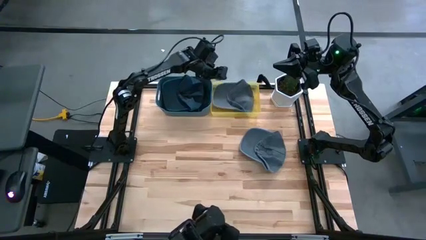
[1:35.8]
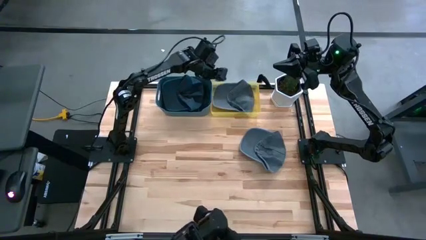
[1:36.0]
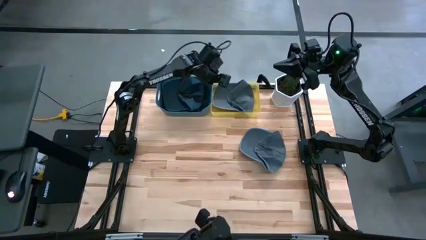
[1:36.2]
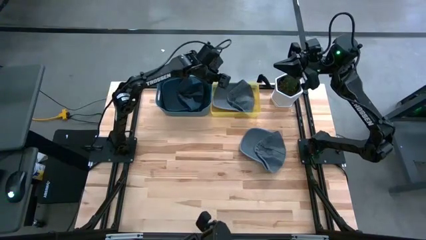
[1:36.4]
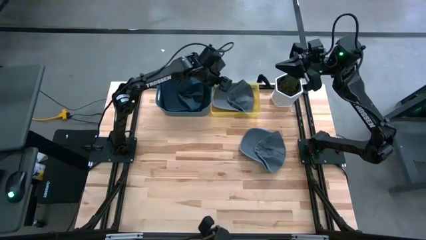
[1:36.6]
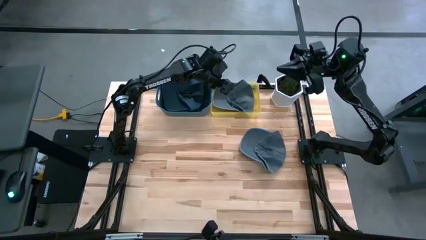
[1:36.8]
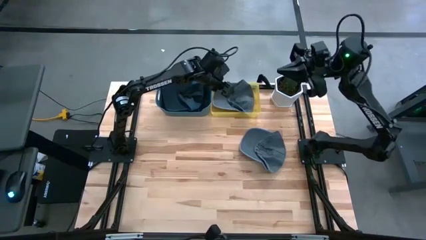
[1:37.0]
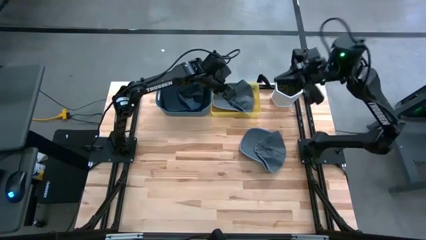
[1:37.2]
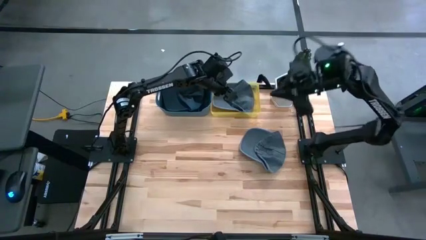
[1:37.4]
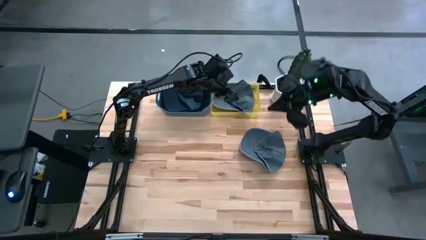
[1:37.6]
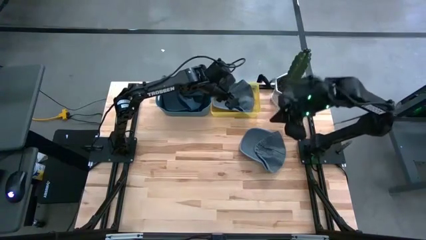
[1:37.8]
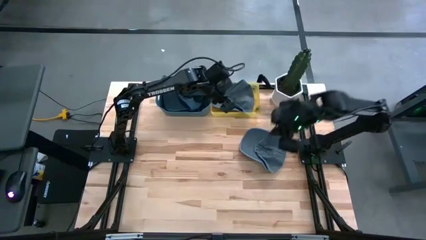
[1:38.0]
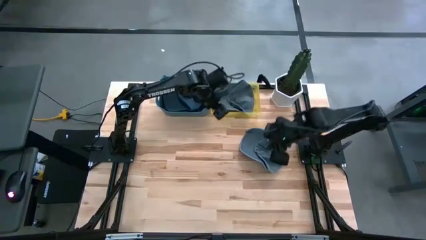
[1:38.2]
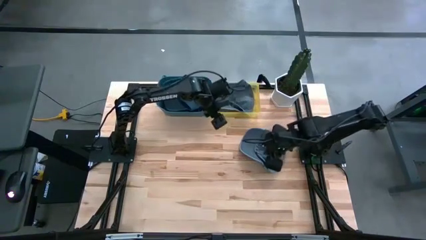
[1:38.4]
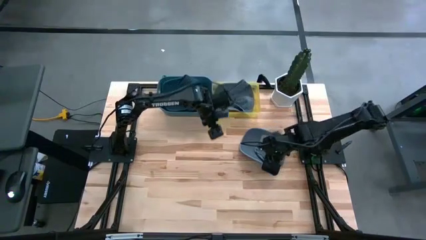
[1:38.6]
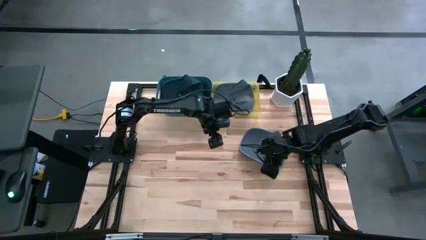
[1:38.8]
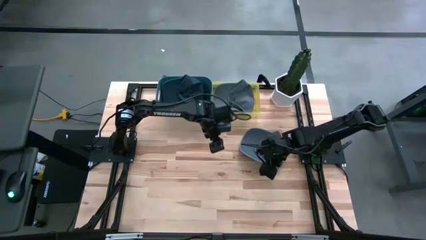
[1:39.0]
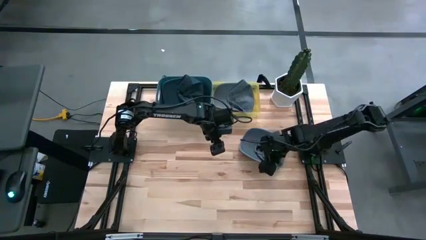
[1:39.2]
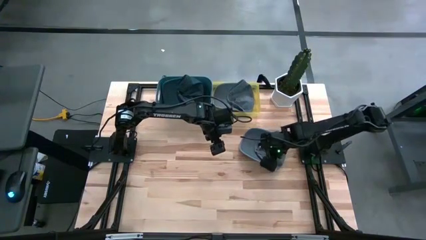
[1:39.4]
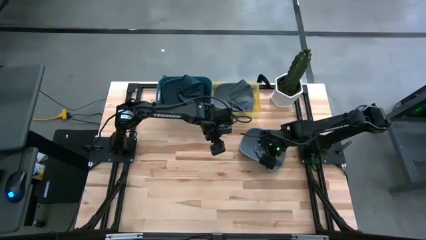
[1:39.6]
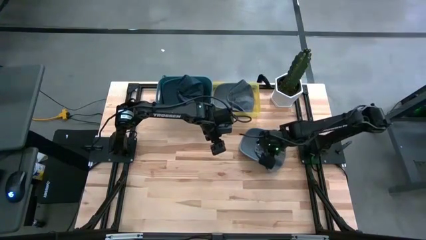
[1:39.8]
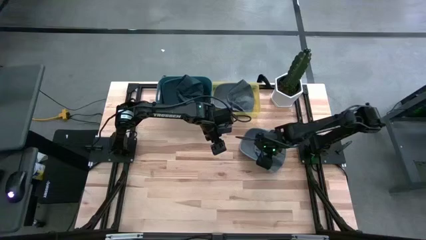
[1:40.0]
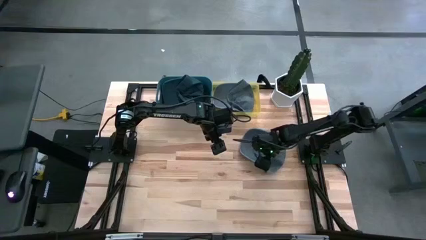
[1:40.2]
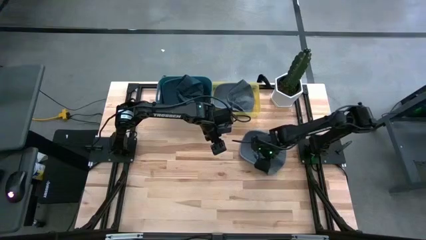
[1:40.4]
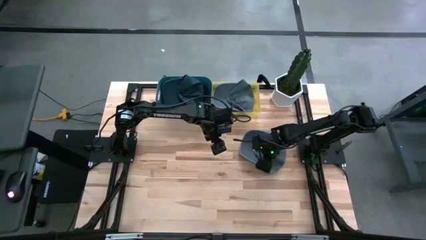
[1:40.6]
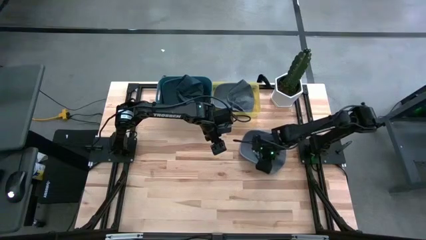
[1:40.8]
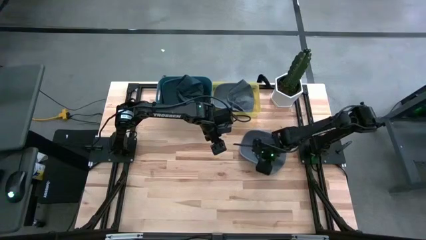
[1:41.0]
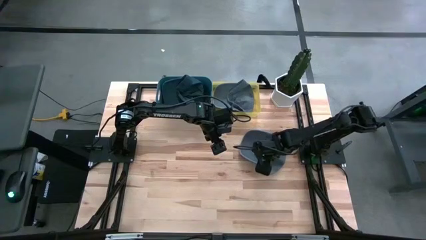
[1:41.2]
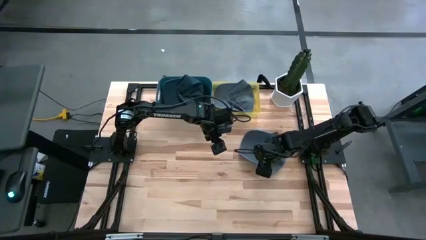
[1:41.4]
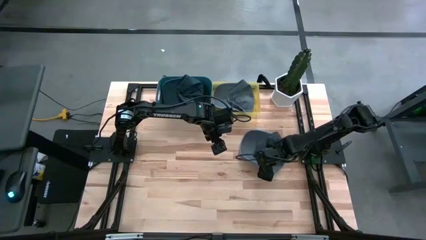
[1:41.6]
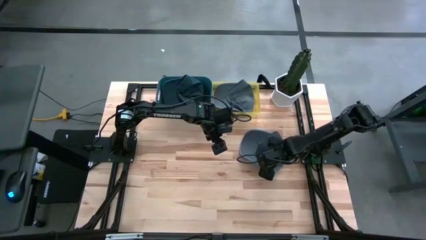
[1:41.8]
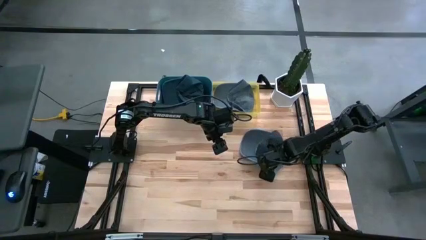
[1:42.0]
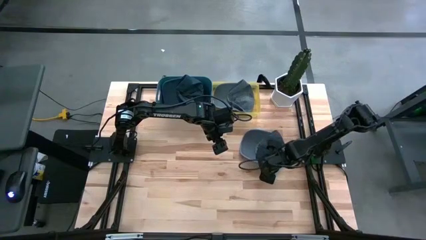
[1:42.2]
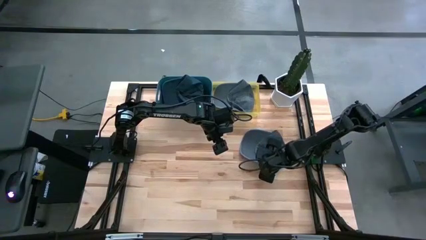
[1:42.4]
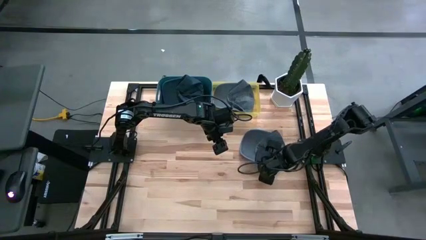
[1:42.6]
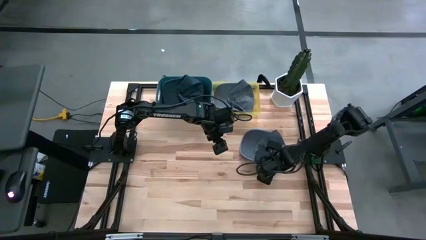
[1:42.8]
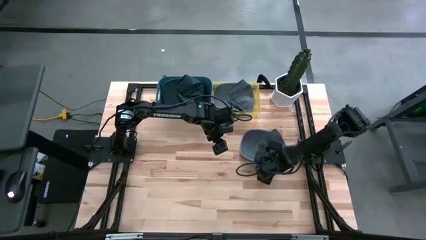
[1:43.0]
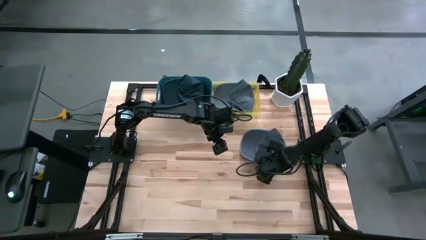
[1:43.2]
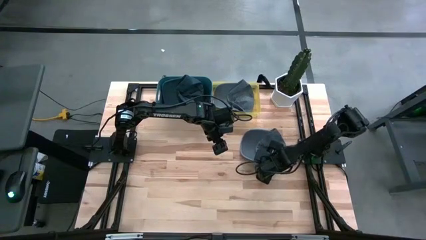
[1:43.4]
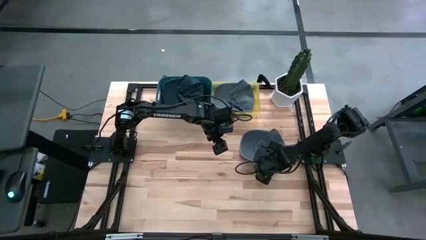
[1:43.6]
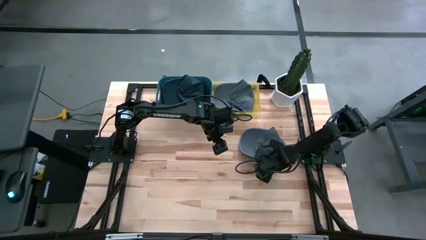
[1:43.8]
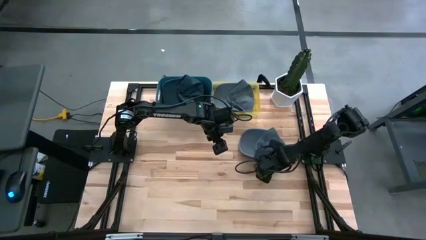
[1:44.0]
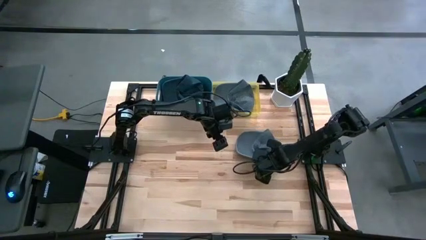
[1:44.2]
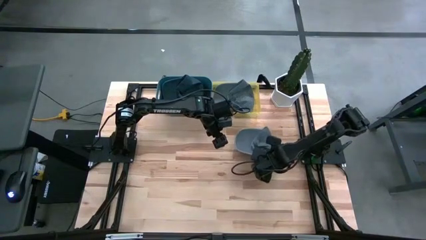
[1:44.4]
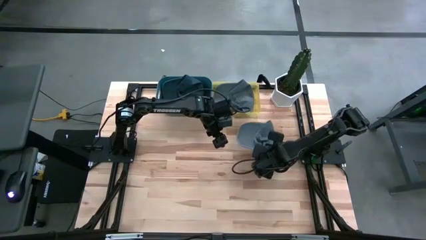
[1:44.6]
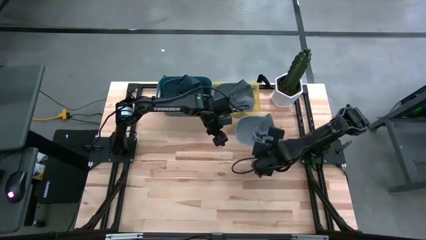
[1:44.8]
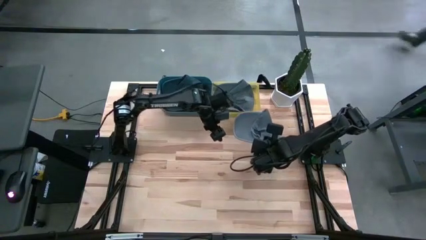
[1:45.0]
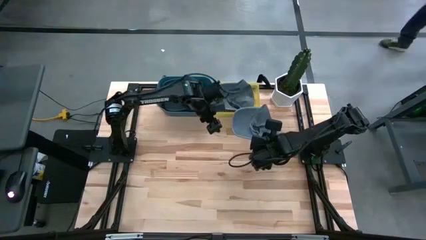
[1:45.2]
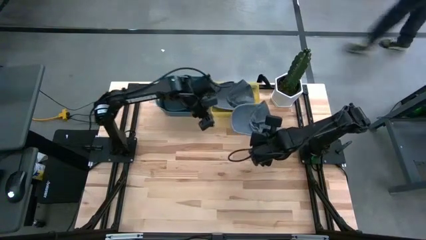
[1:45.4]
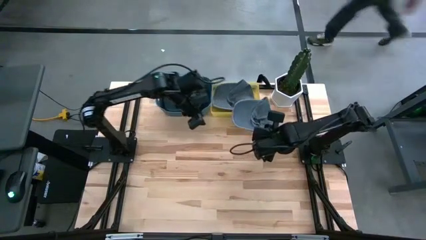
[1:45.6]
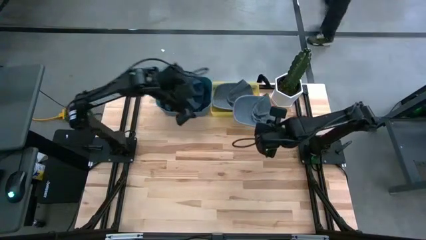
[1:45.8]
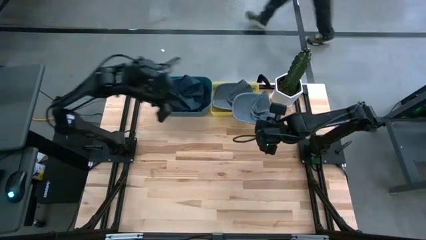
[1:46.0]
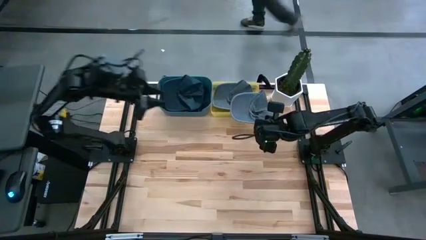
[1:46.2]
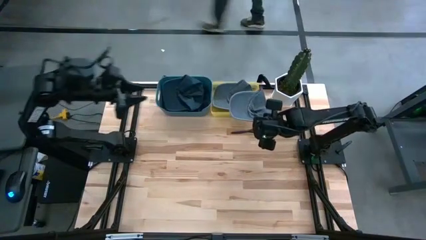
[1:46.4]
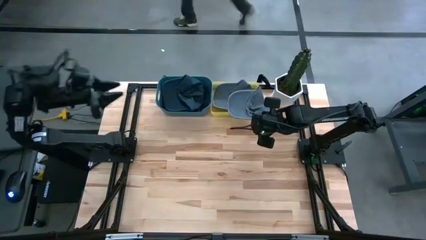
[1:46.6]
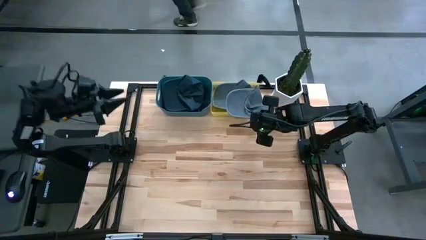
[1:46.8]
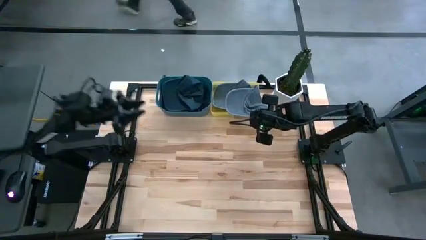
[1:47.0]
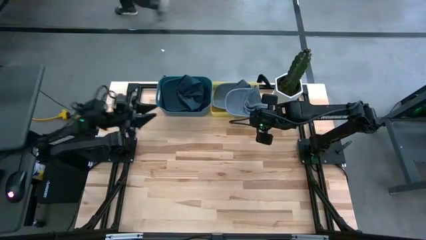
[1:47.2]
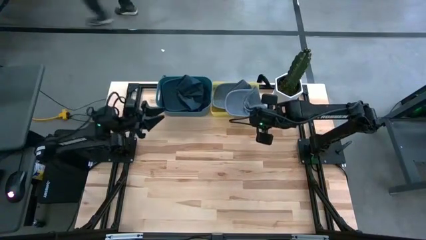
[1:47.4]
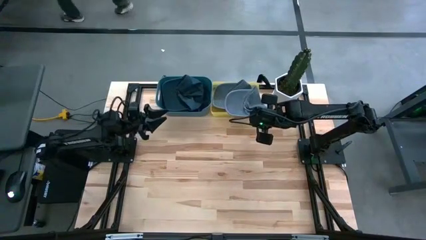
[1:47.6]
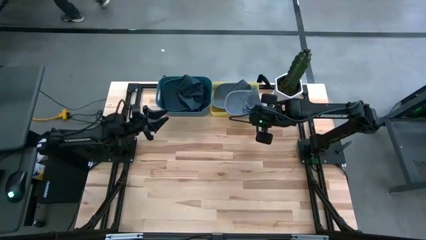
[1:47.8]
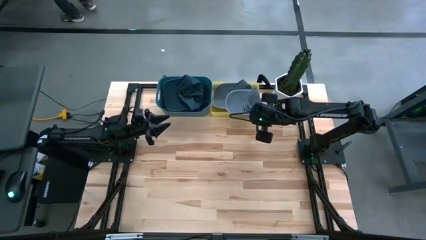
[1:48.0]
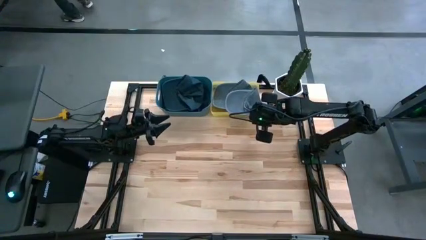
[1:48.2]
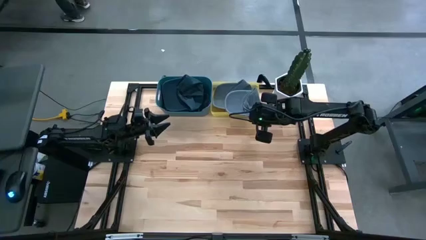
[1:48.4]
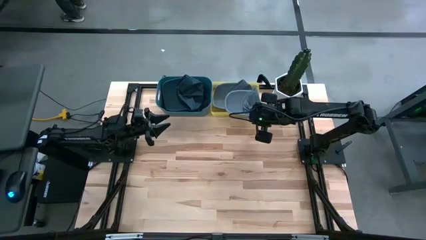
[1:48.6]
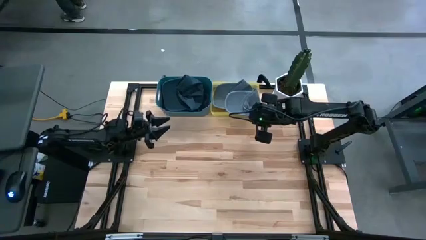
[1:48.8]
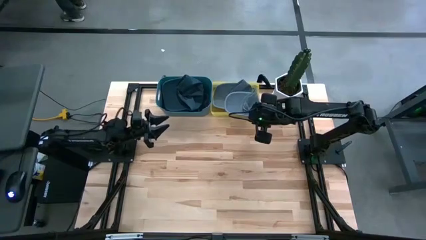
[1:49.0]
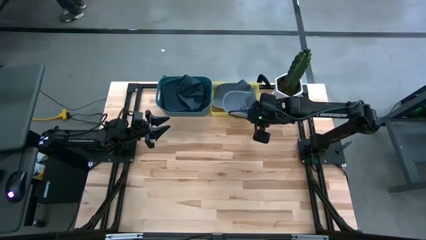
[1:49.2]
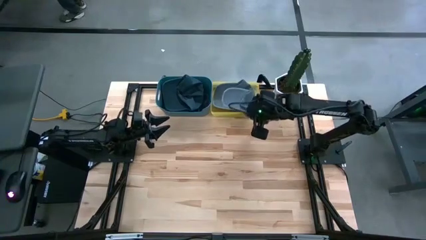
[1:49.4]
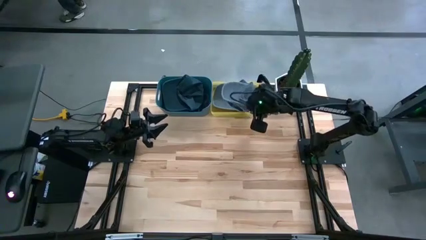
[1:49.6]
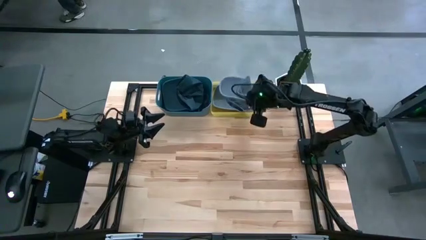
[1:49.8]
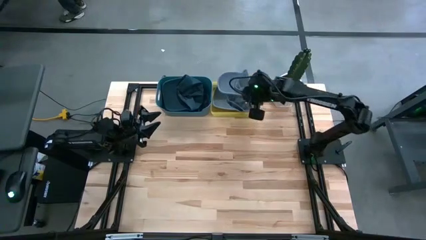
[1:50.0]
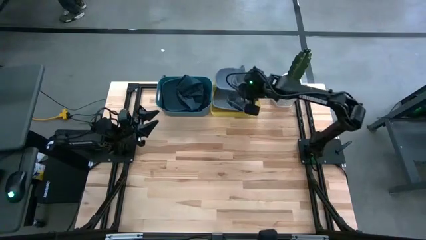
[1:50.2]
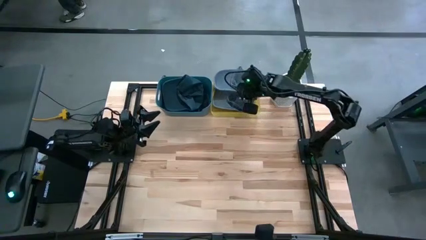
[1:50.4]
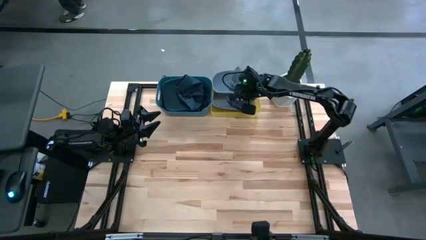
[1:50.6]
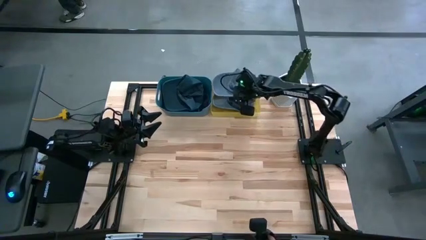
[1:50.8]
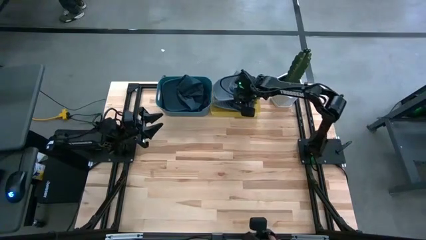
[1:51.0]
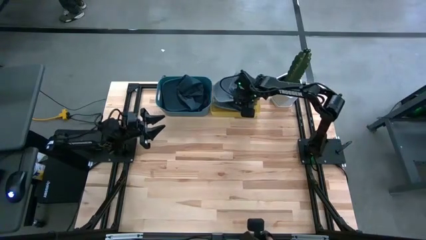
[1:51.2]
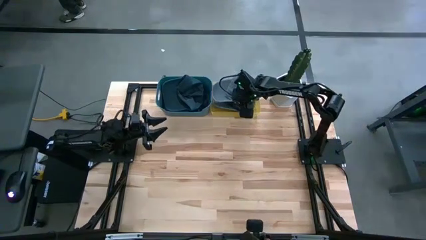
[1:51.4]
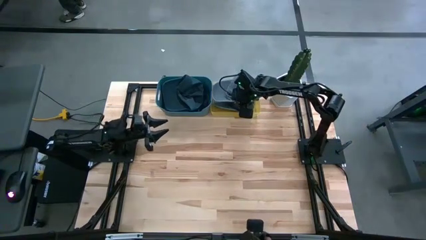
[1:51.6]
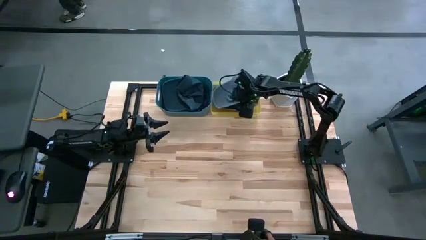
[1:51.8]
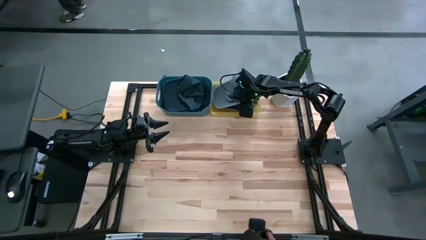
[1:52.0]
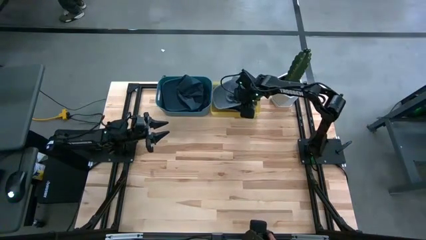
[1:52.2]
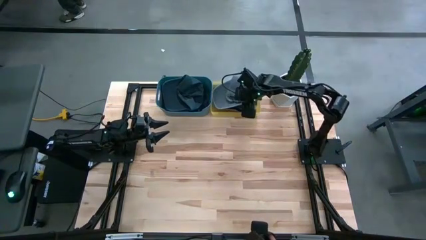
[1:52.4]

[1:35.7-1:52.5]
Task: Pick & Place hat
Put the gray cap into the yellow bin
